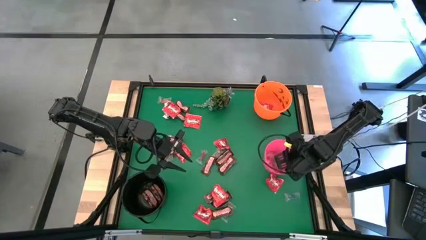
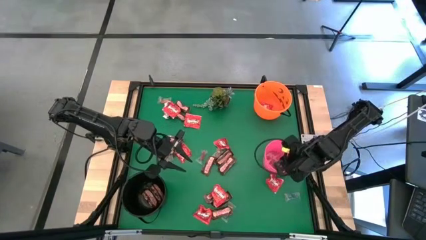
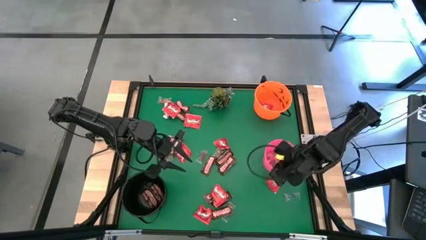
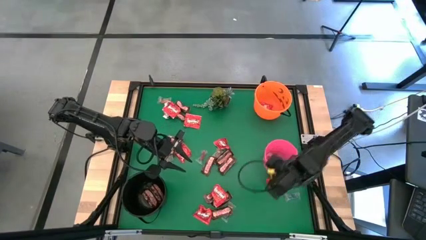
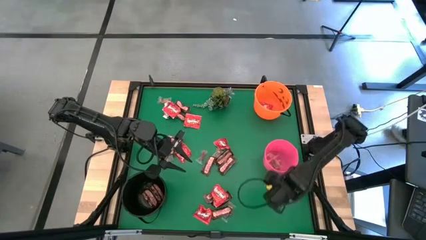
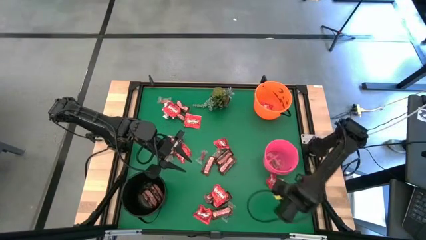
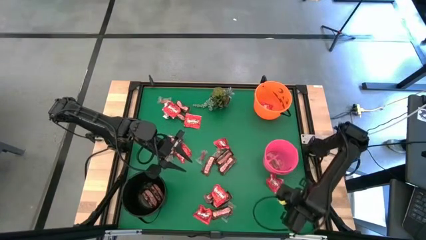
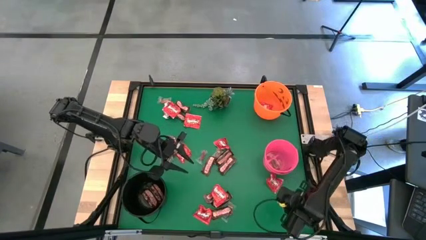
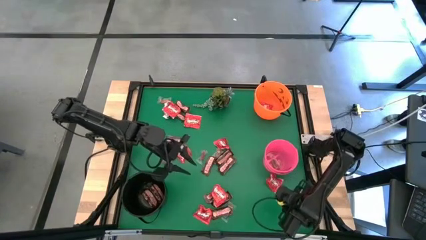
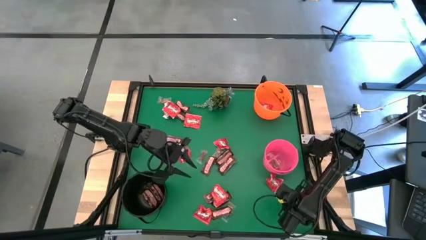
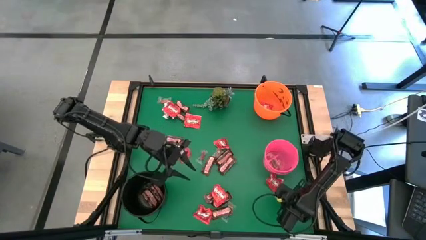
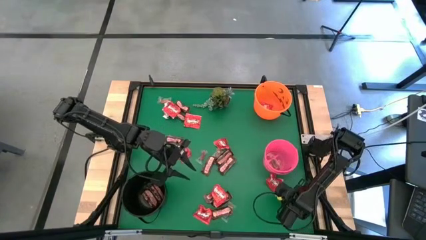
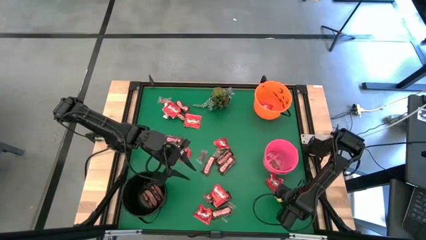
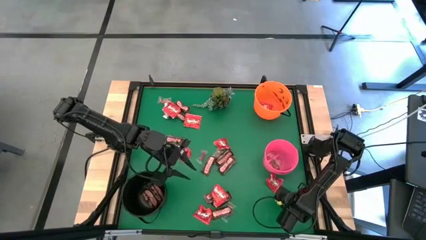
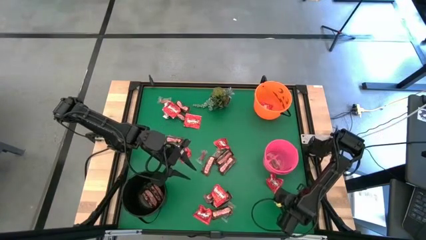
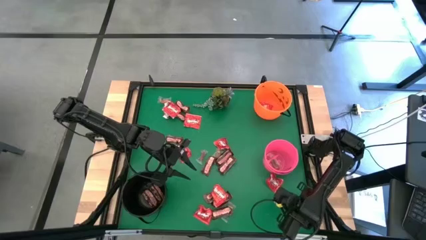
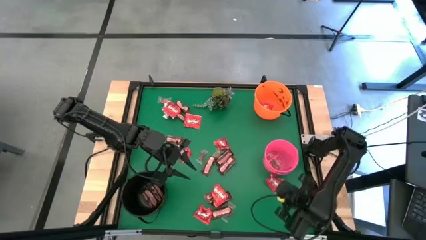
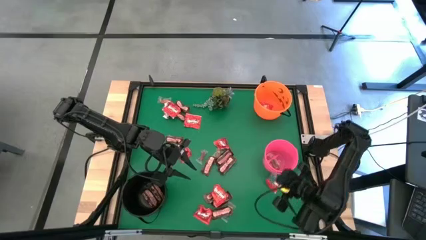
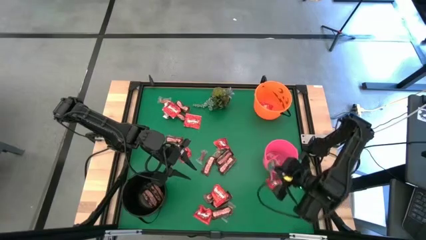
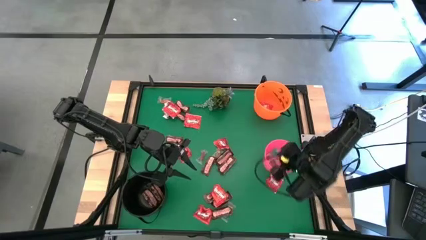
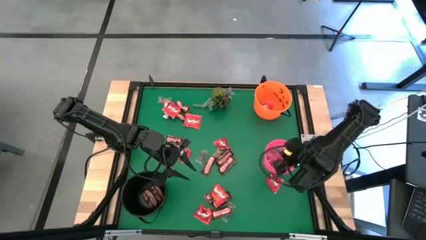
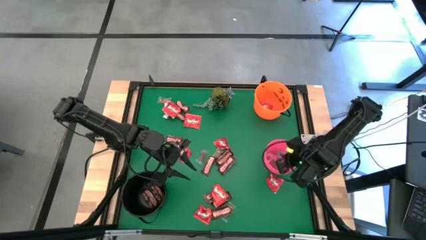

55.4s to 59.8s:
Task: Sort candy
Put the blue candy into the pink bucket

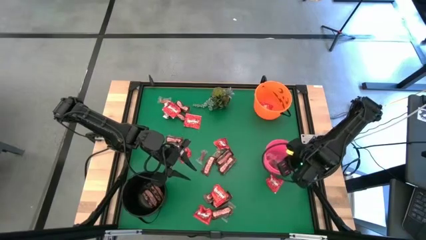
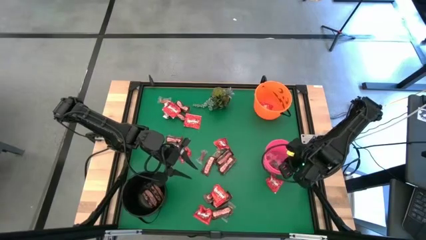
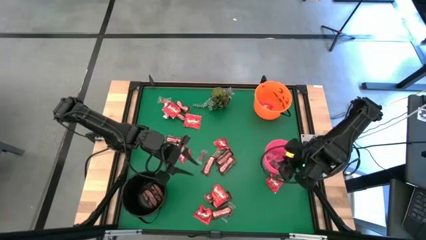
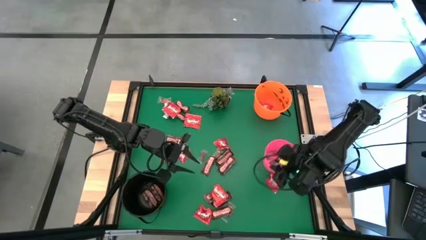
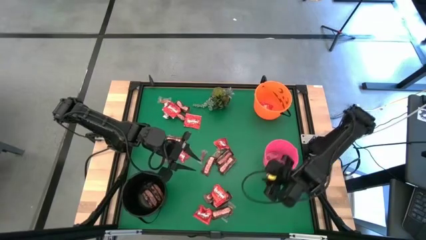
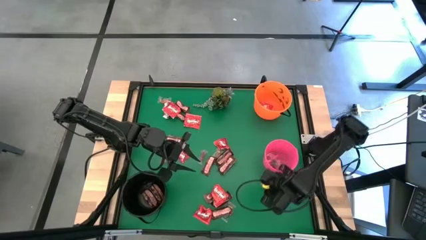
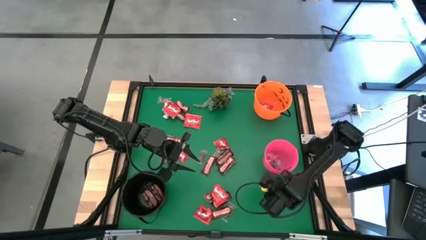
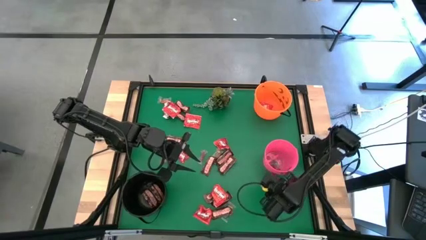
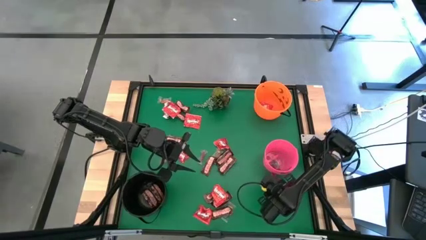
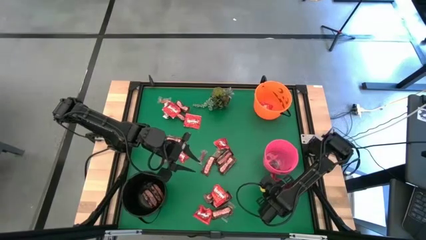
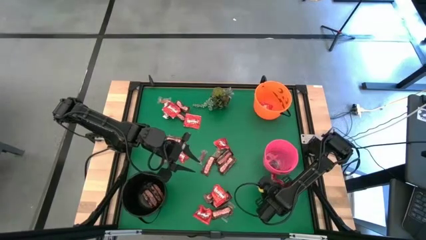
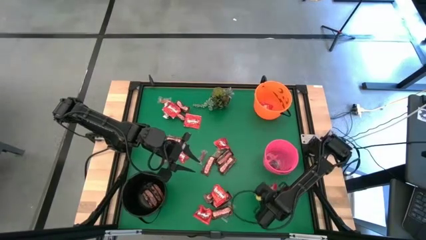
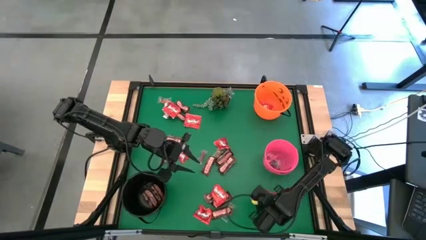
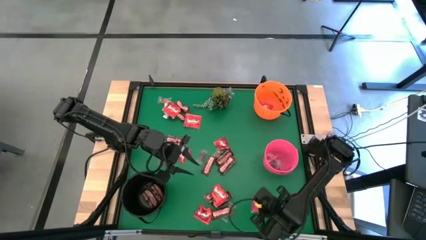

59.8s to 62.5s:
Put the red candy into the orange bucket

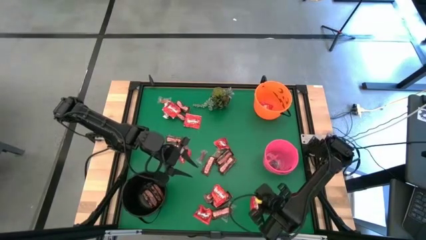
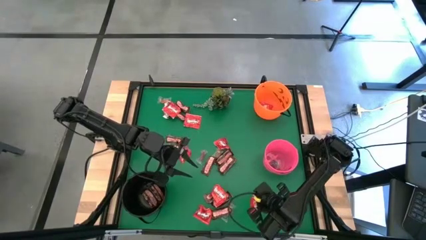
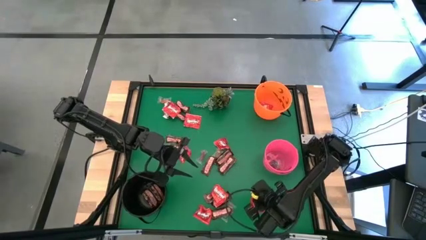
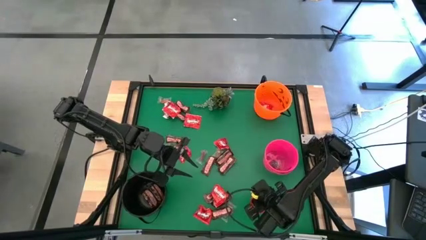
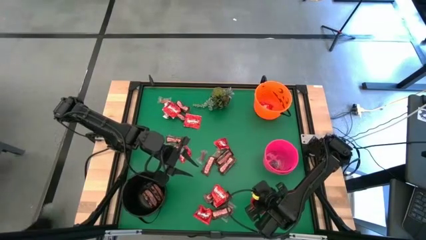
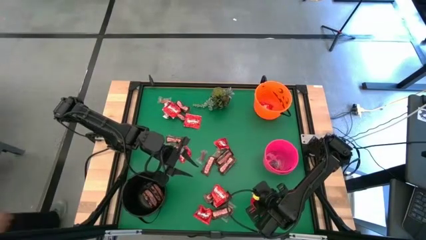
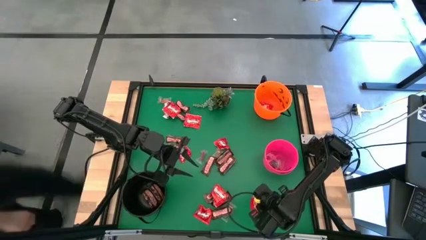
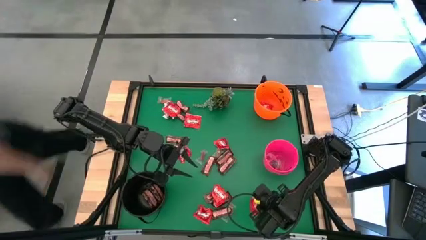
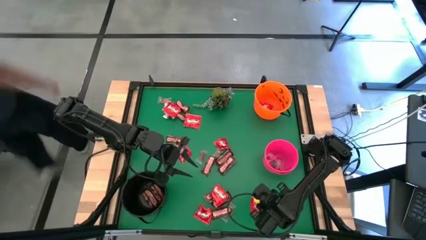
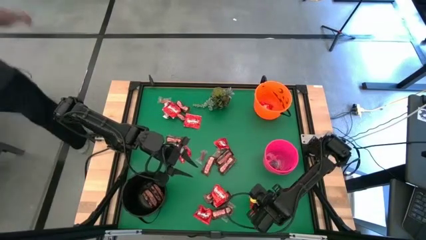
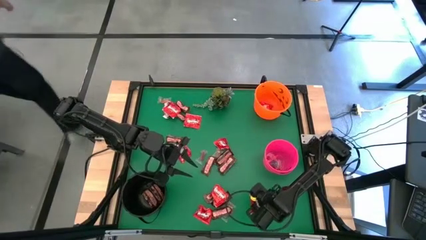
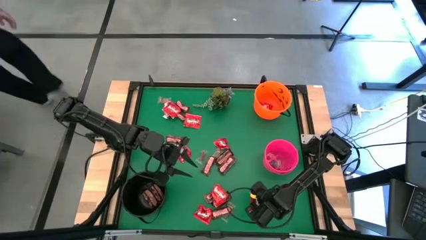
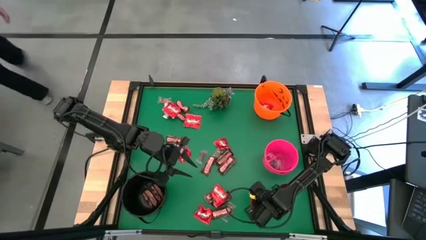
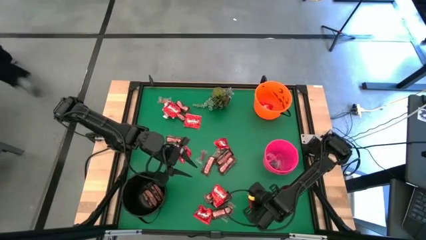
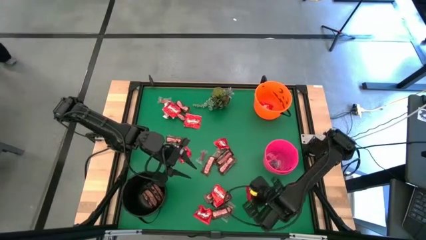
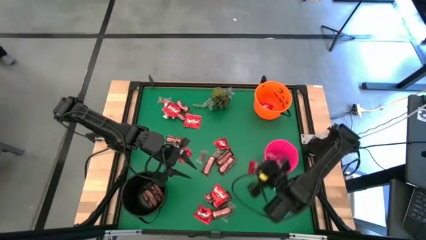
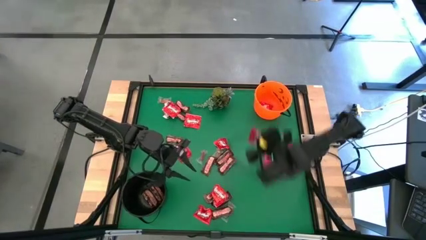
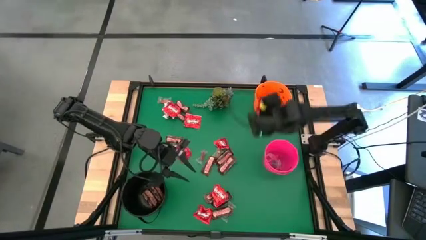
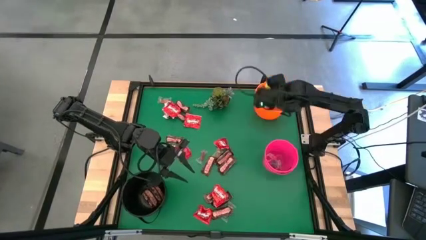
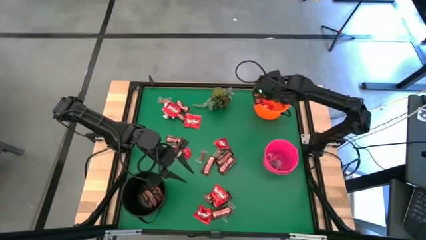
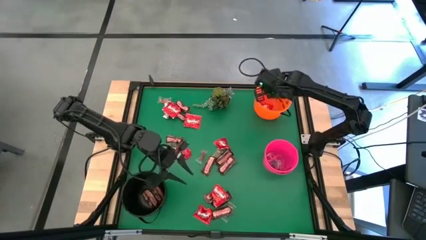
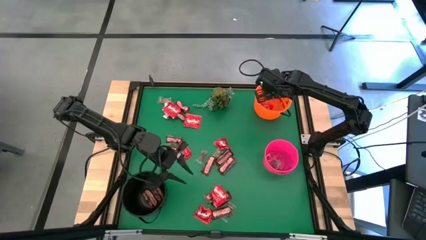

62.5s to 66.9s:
Put the red candy into the orange bucket

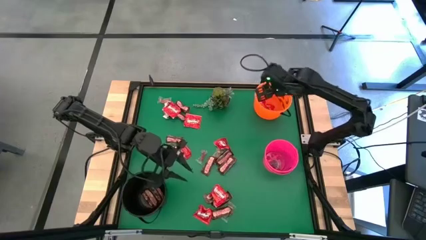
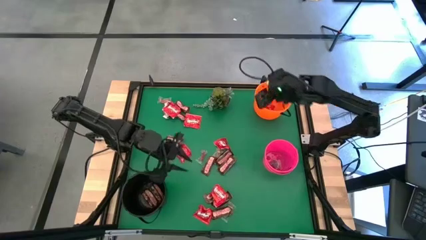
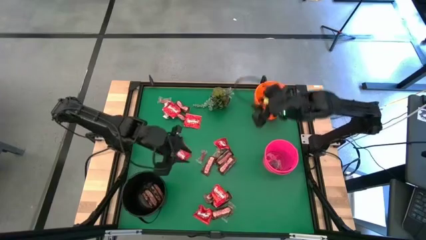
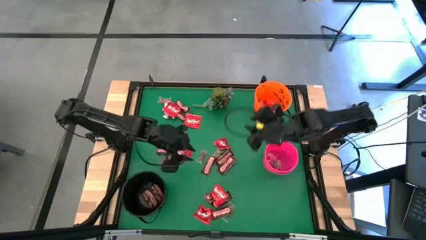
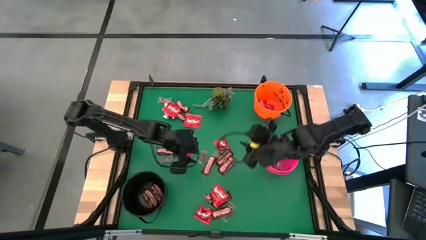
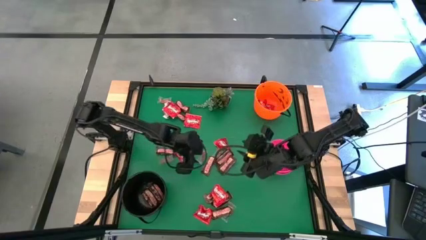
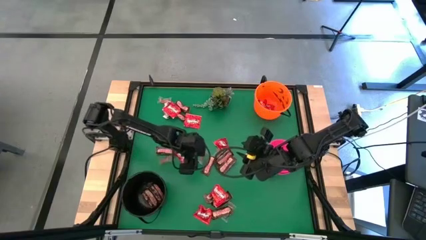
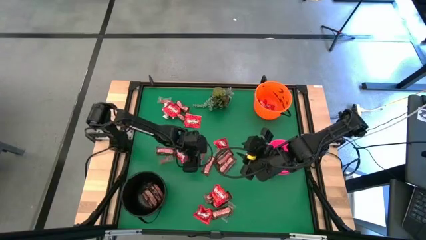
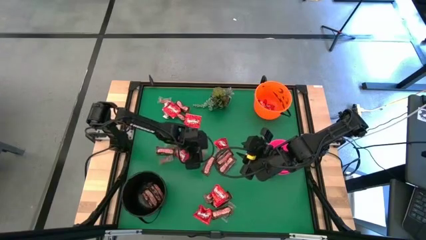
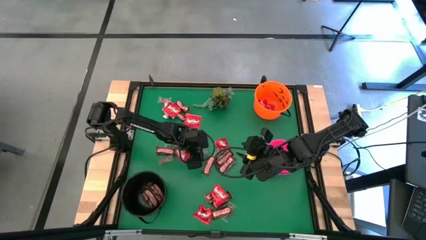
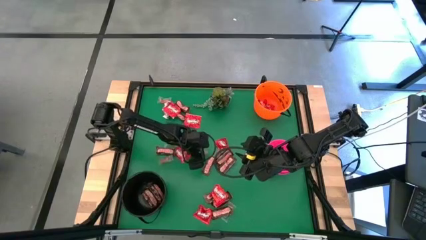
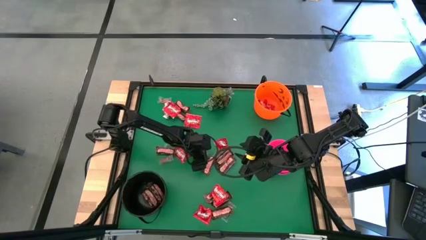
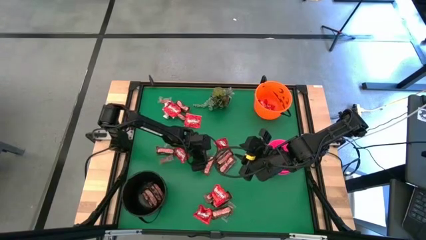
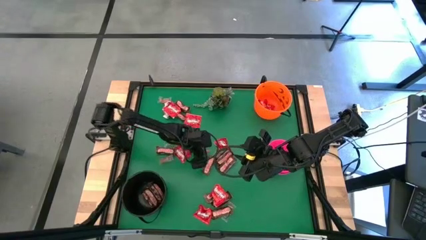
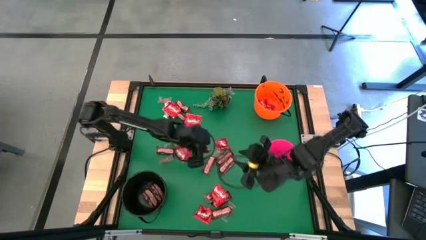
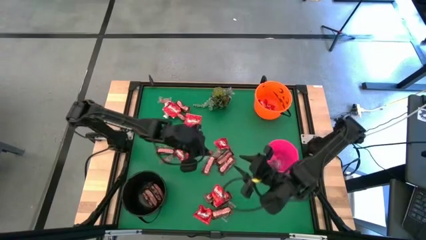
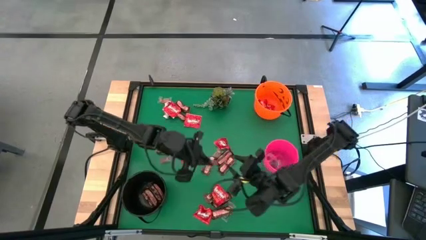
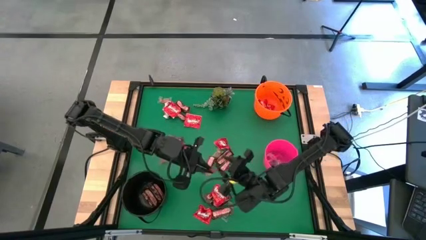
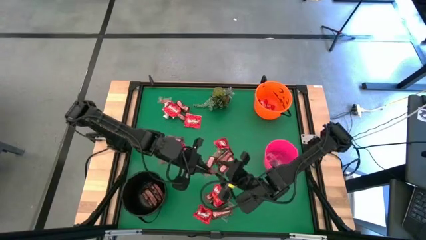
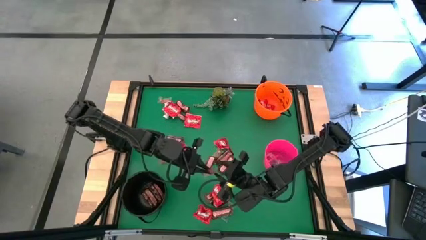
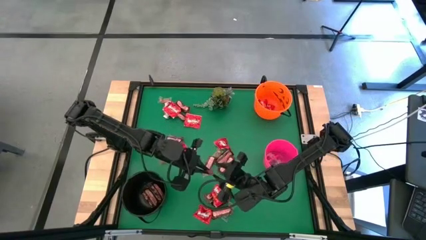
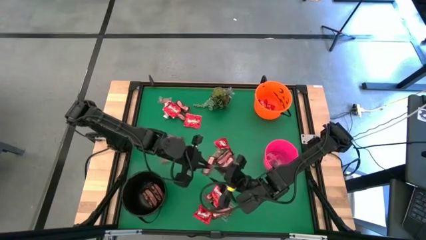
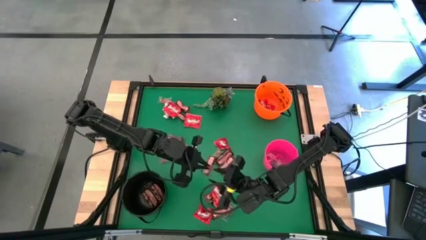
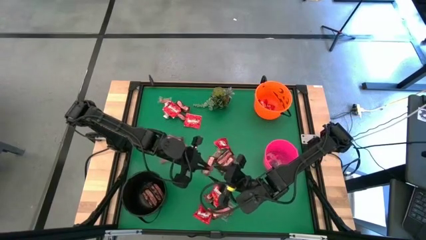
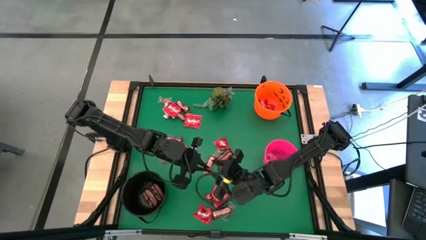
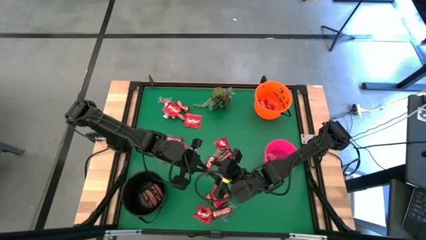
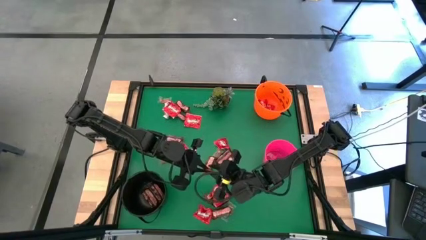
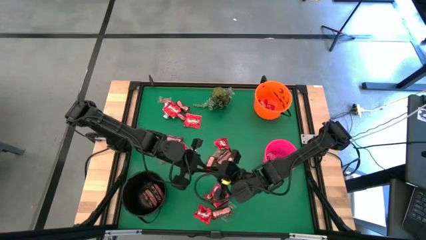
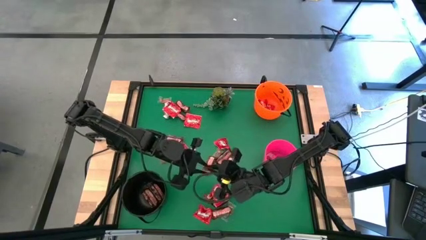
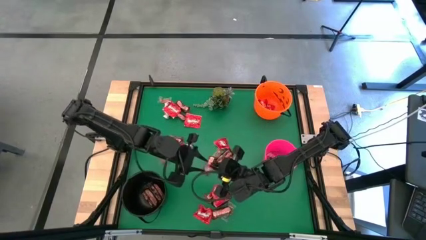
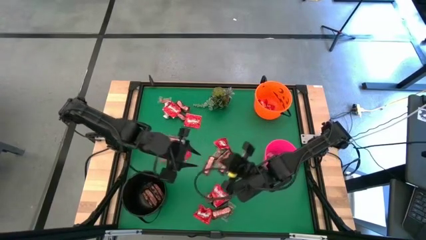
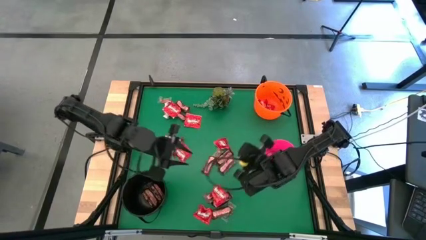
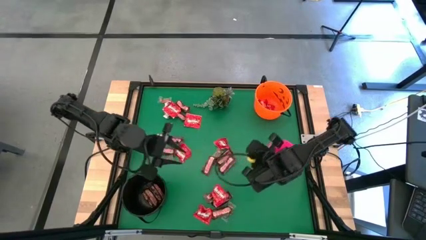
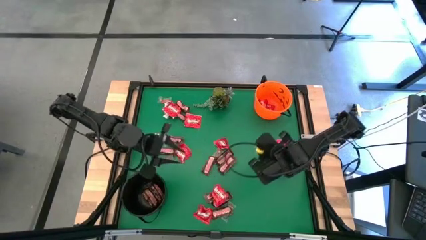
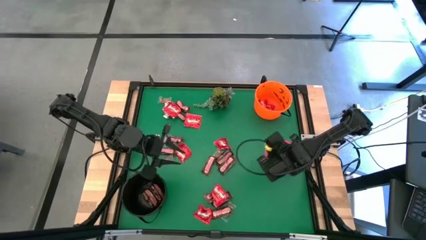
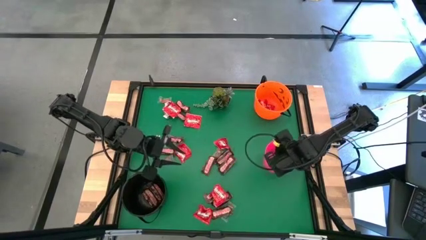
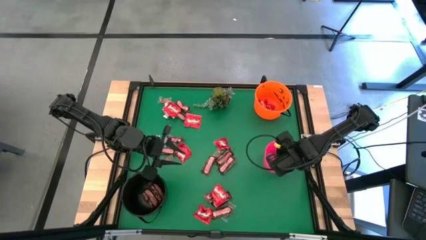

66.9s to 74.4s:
Put the red candy into the pink bucket
